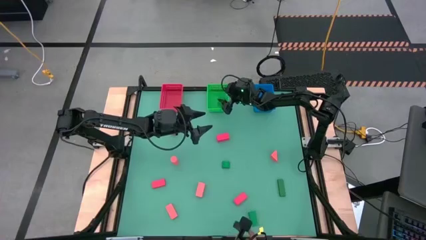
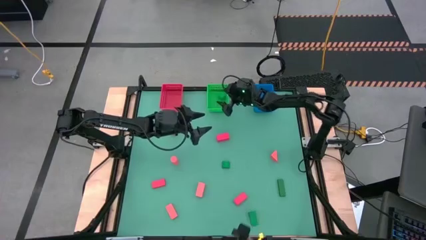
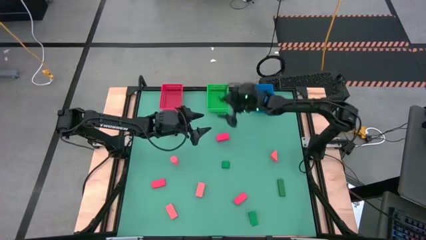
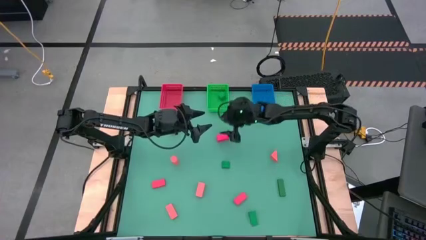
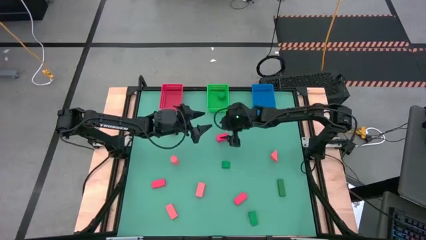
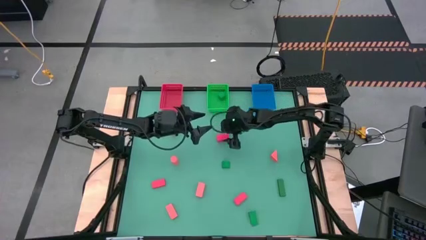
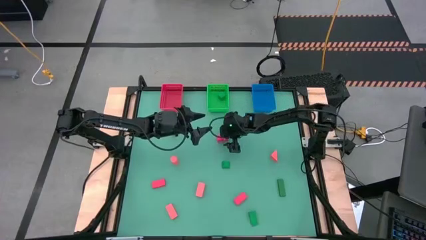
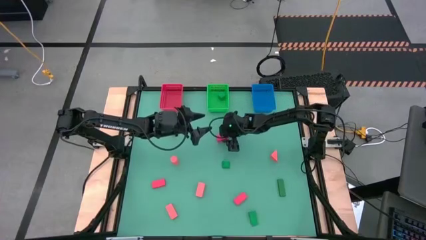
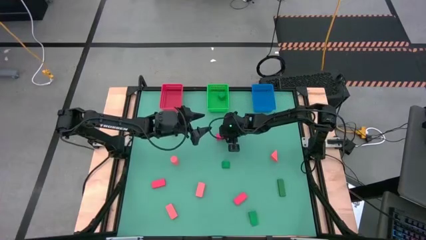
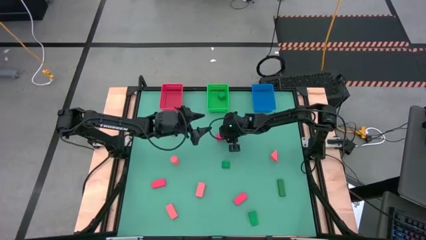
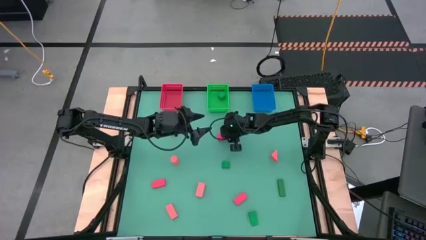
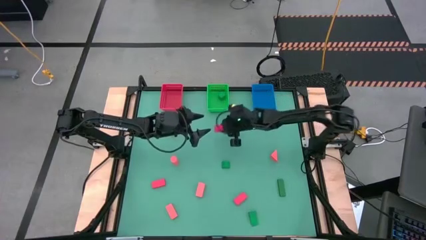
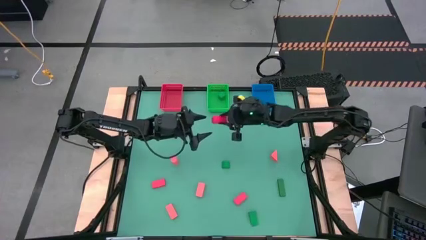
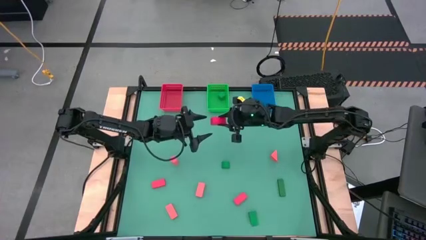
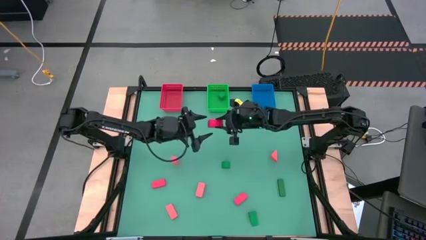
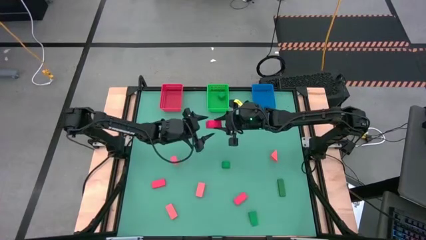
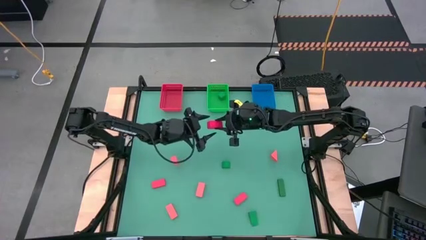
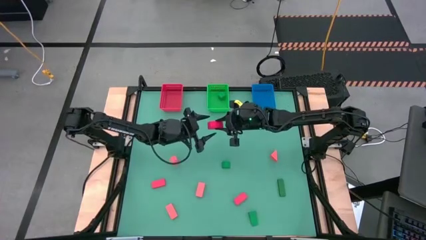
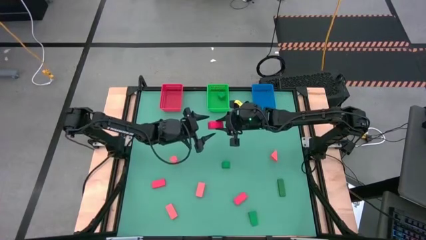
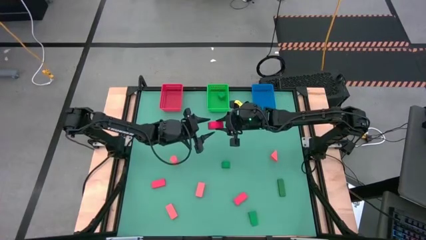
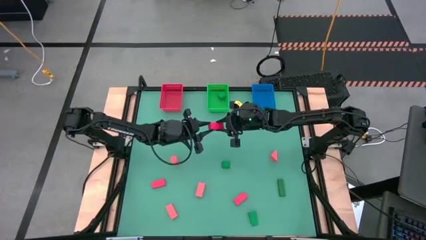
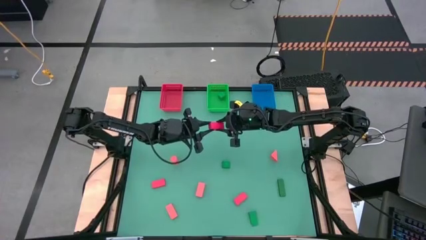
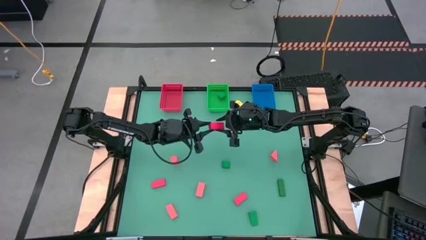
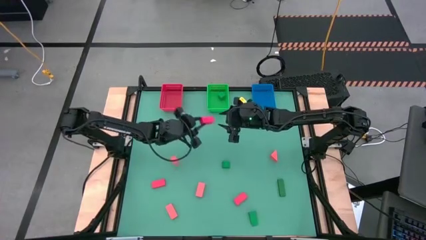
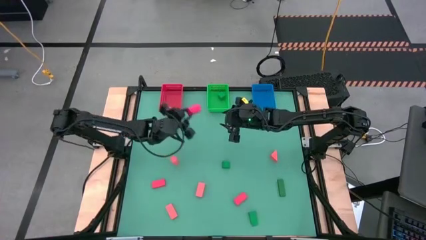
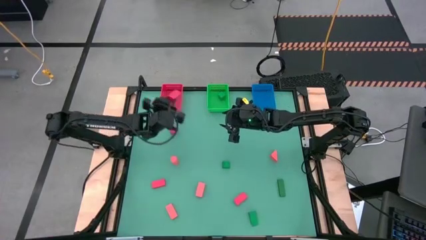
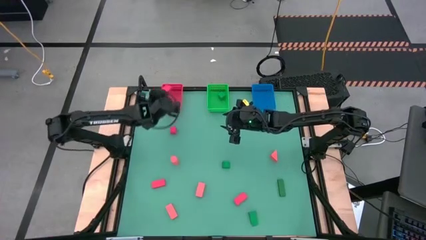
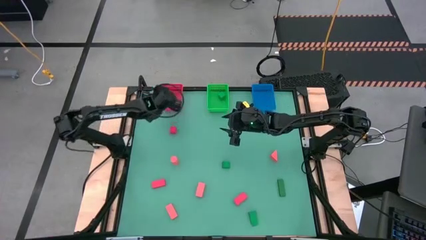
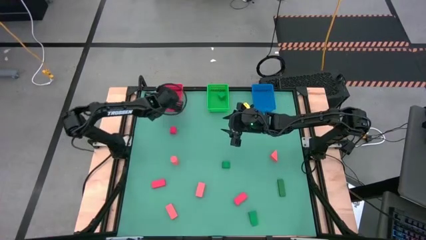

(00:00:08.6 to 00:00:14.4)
Task: Sort & place blocks by color
Put the red block into the red basket

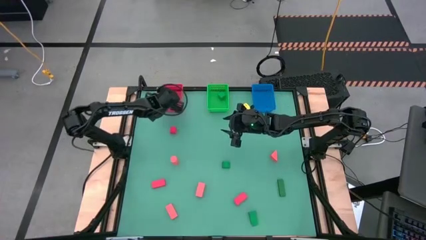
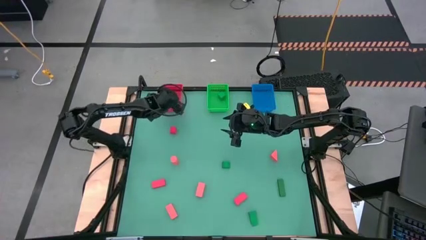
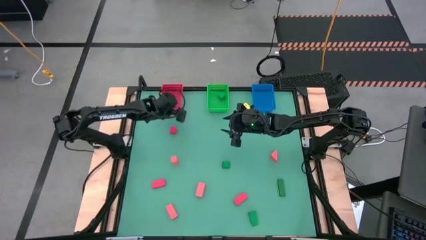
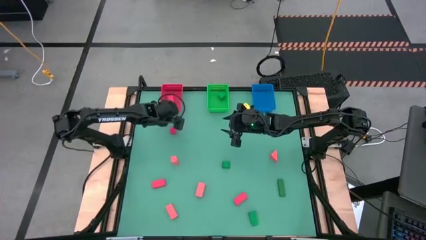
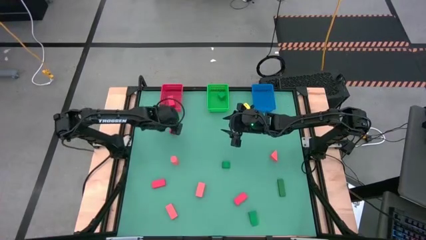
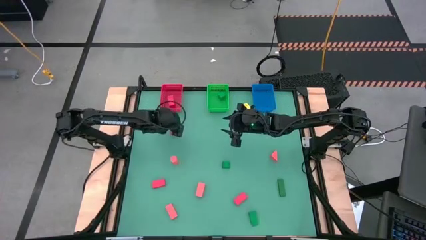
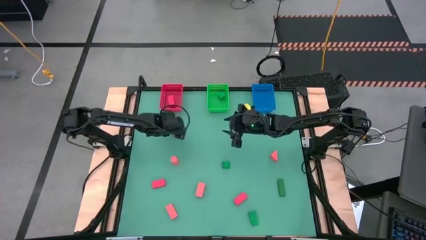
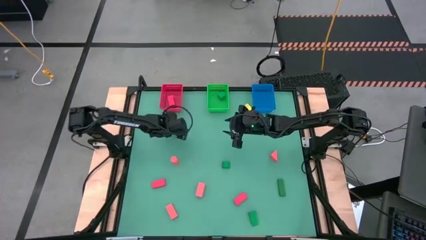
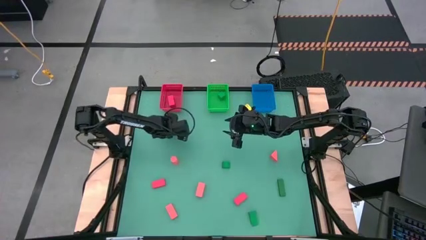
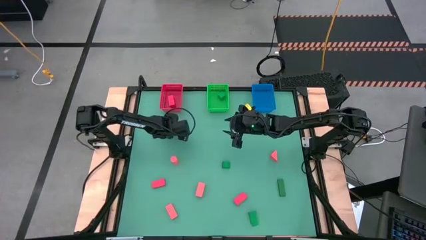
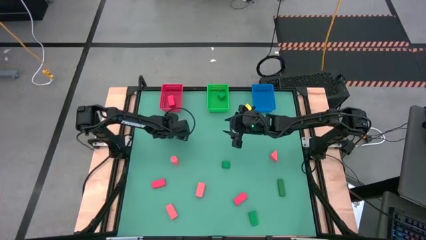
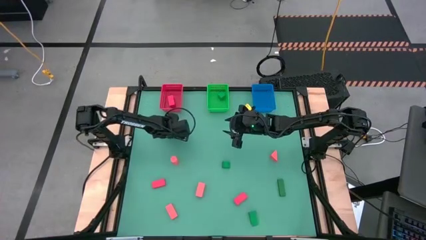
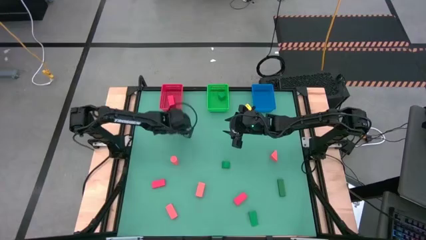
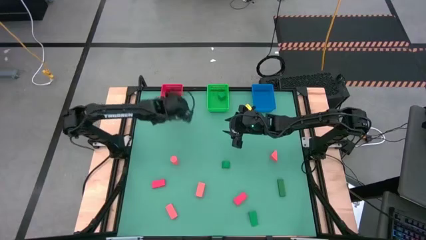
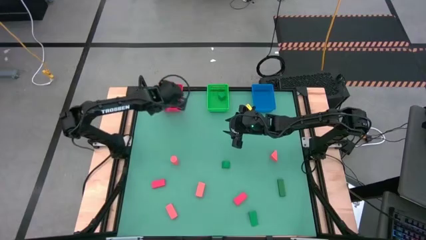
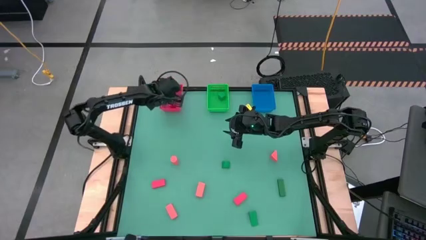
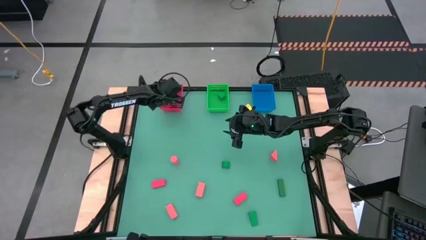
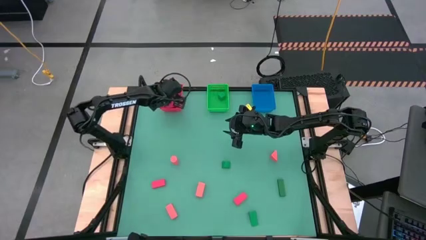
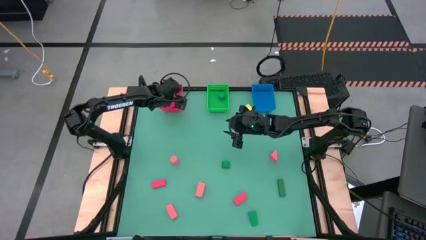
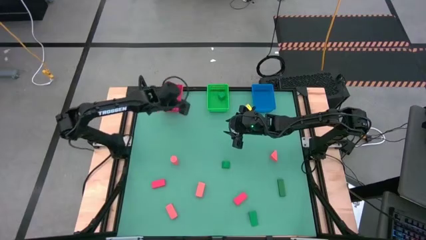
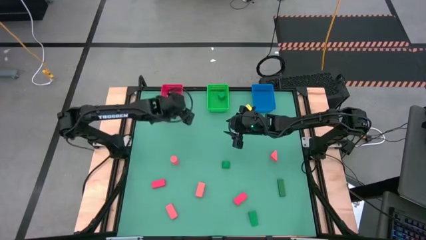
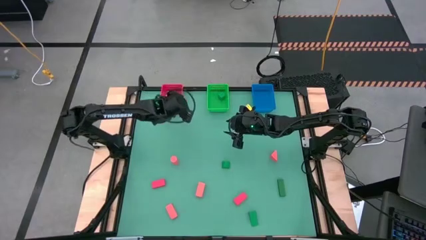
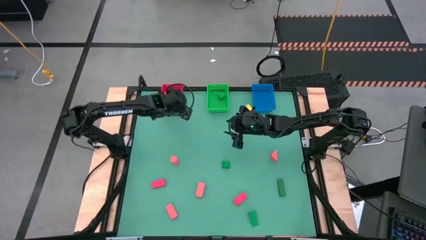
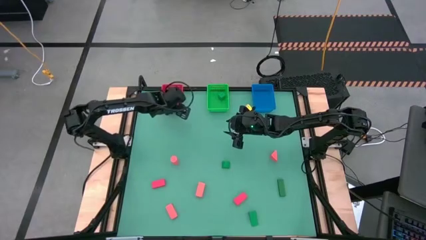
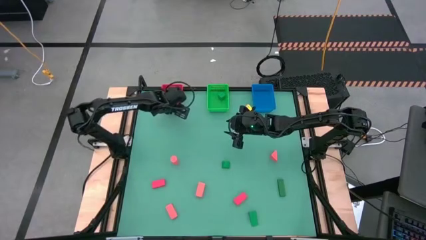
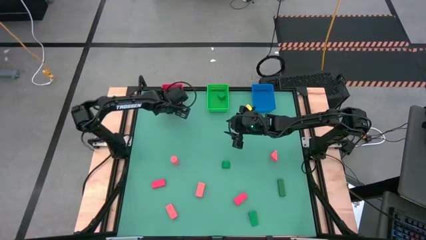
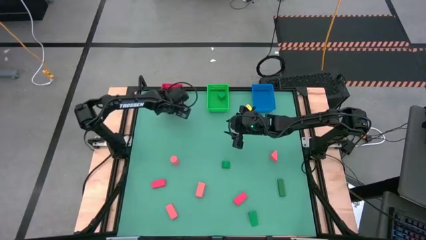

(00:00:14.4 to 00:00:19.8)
Put the red block into the red basket

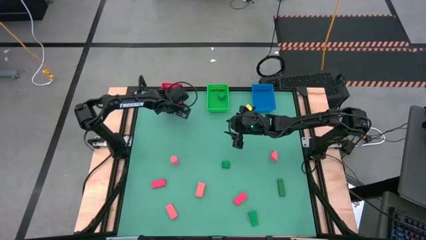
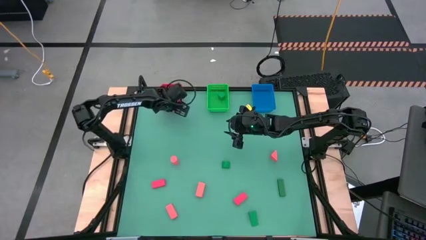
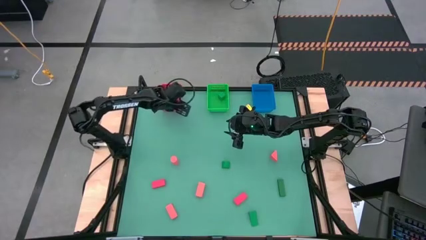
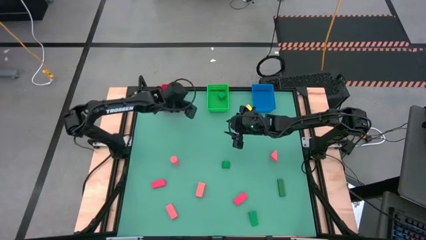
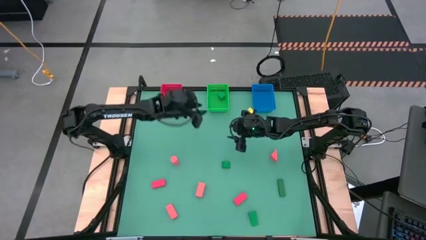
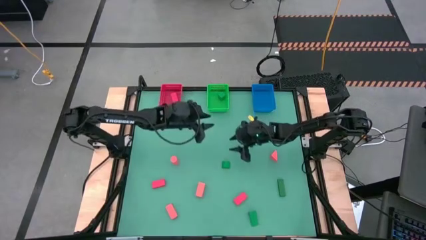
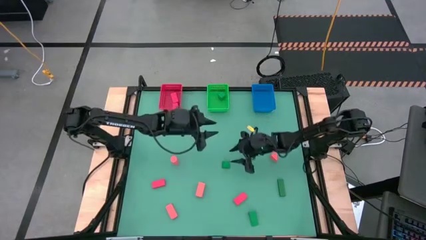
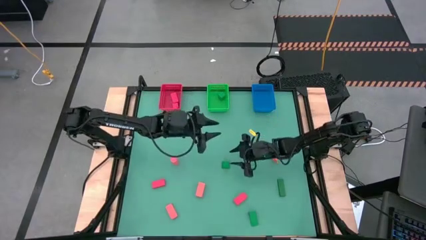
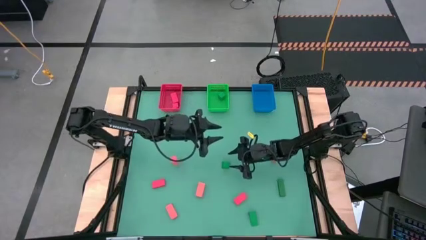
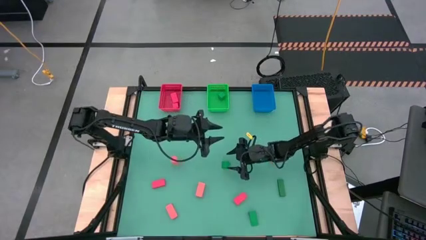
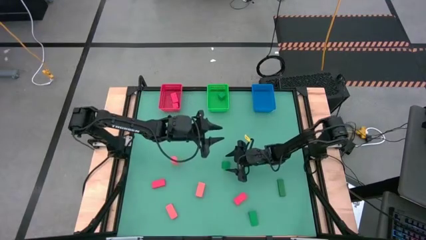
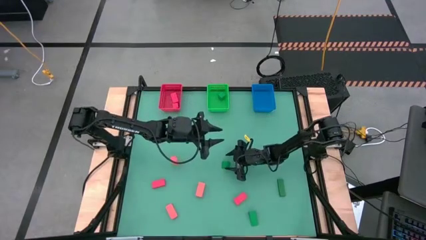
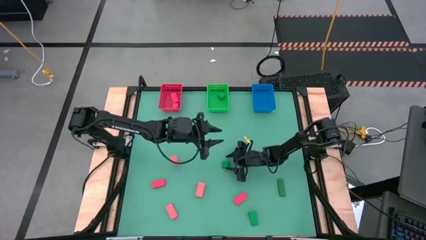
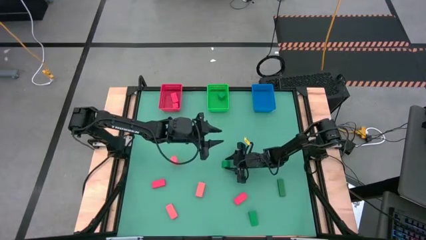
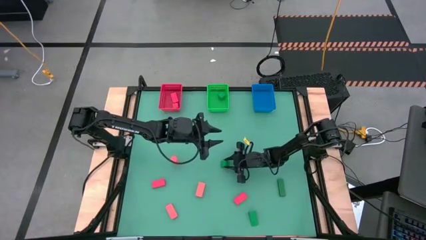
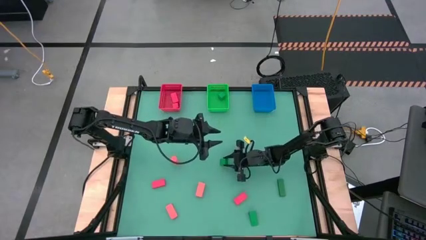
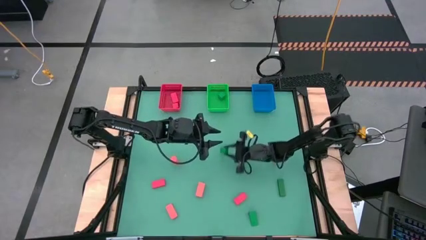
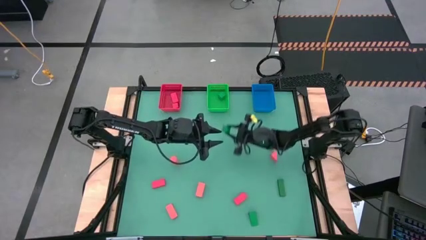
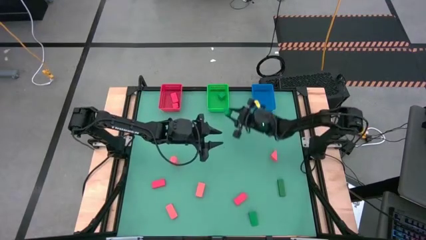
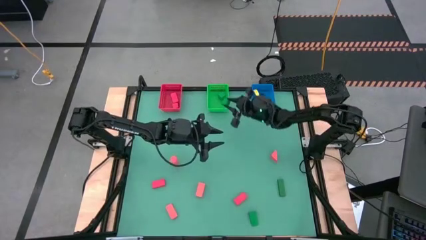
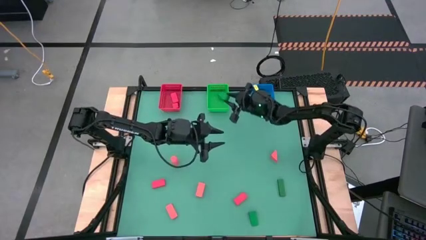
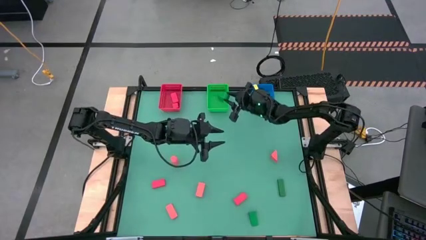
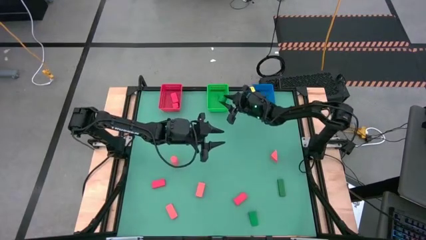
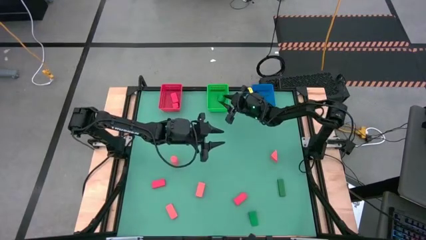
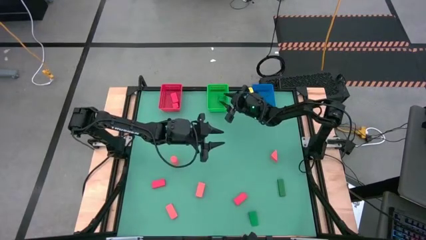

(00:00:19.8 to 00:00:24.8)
Put the green block into the green basket

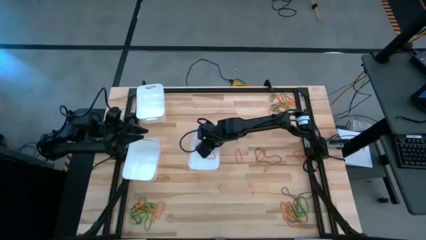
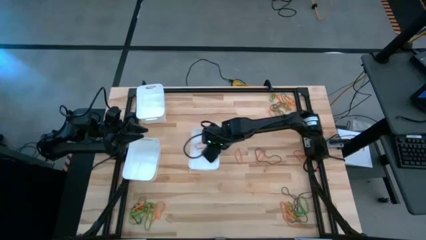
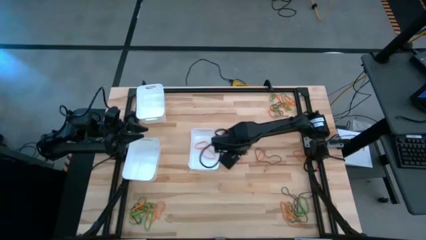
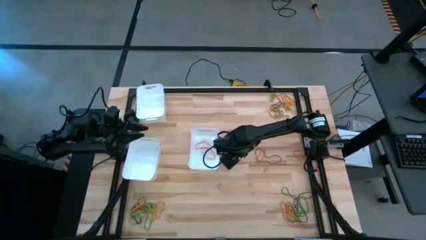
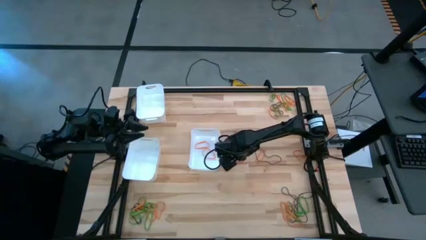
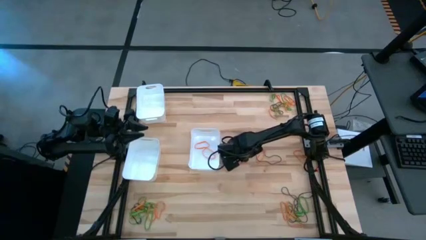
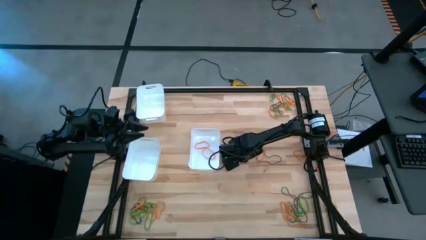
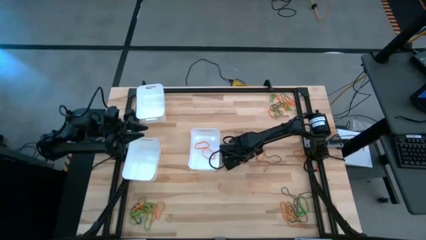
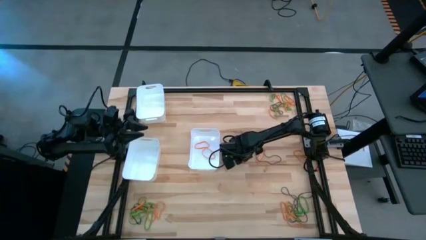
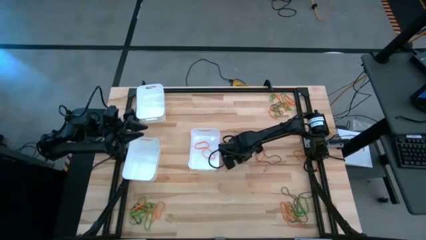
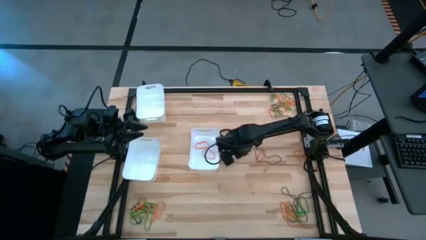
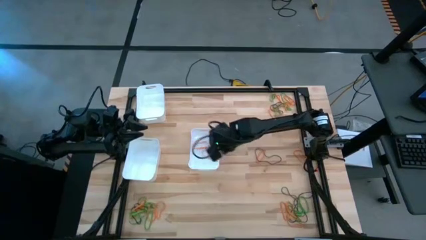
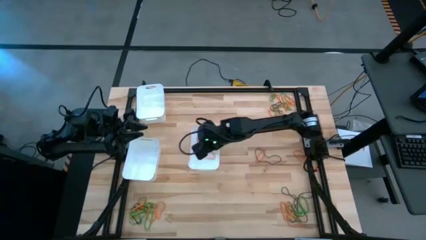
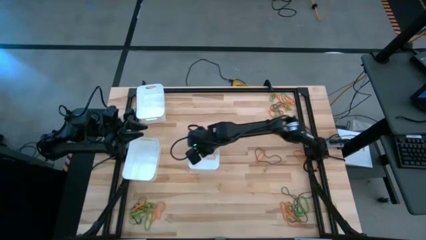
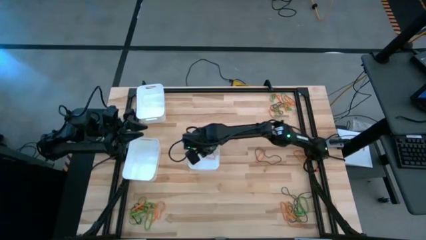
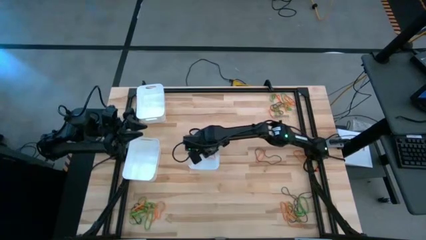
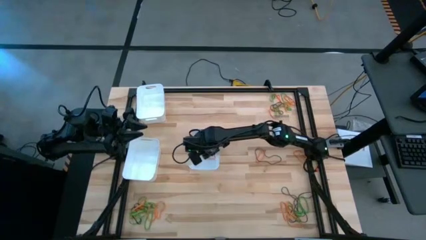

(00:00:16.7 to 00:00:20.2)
Task: Sort rubber bands into baskets
Put the orange rubber band into the bottom right white bin
